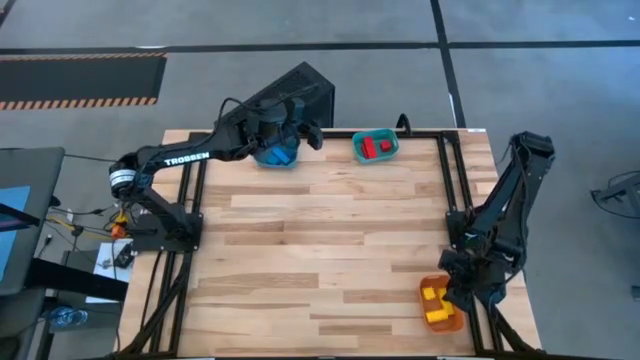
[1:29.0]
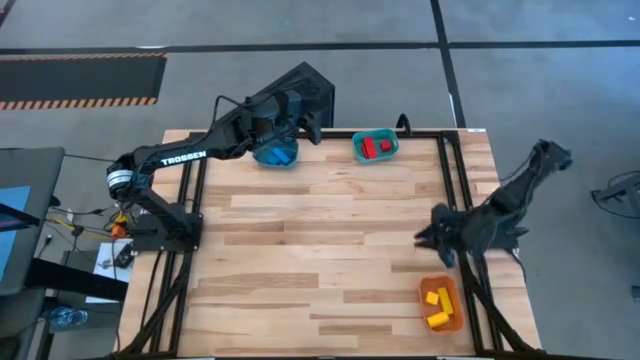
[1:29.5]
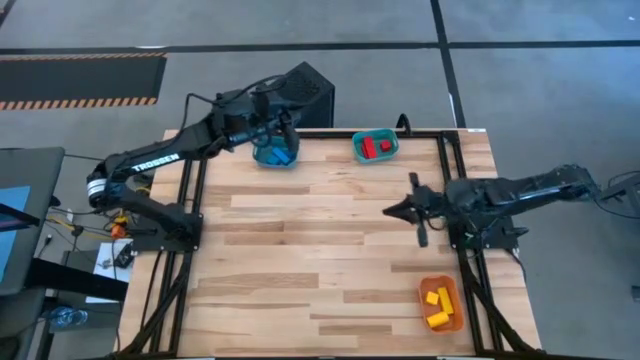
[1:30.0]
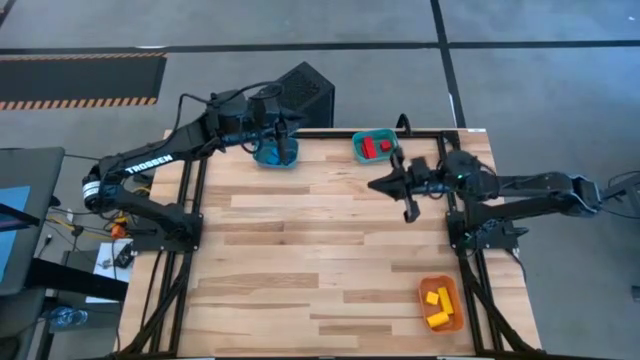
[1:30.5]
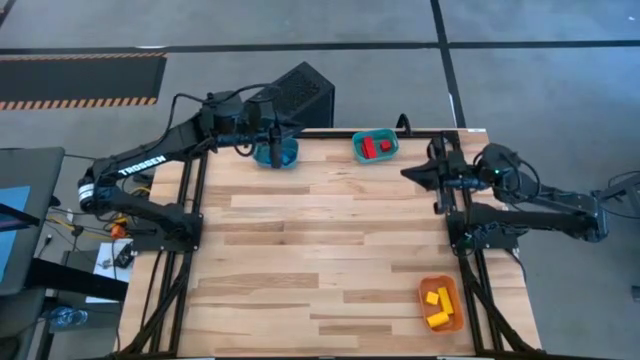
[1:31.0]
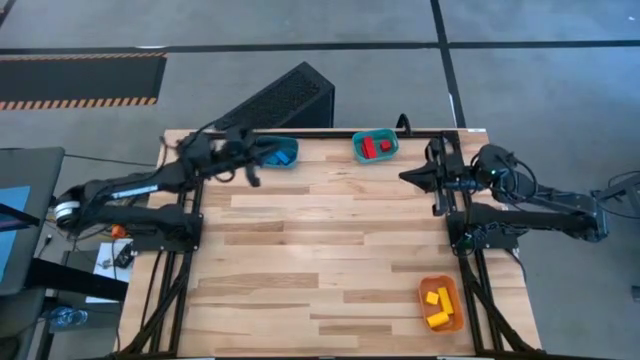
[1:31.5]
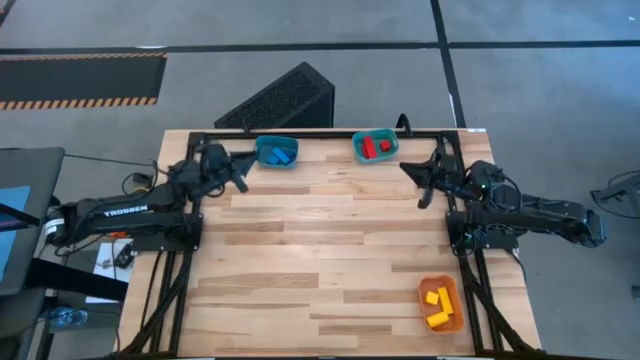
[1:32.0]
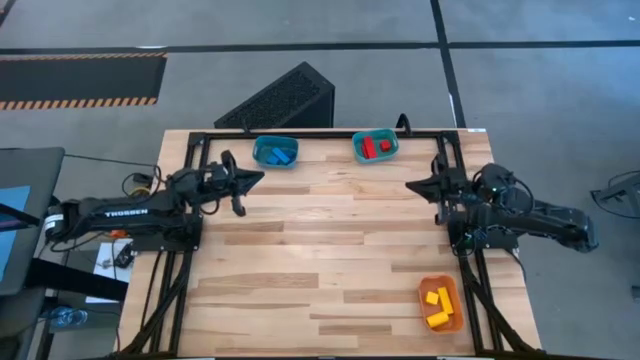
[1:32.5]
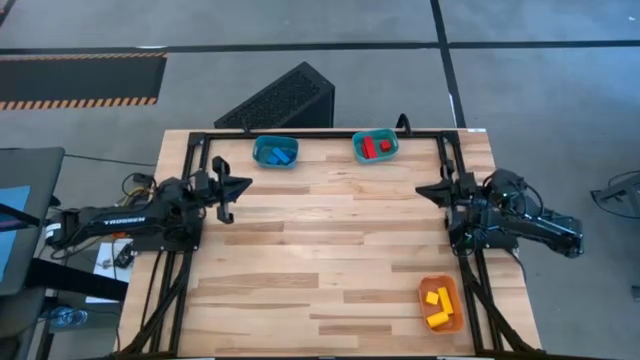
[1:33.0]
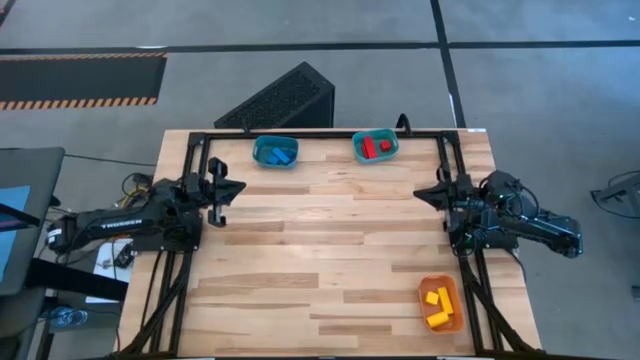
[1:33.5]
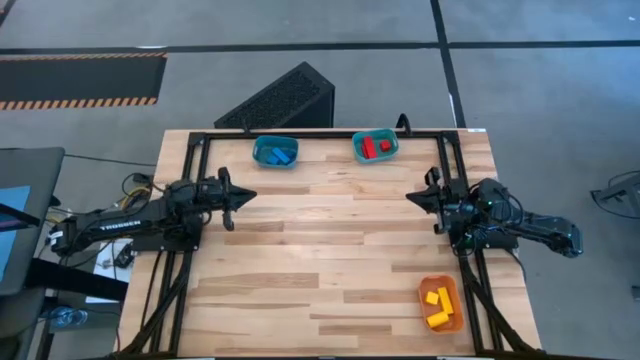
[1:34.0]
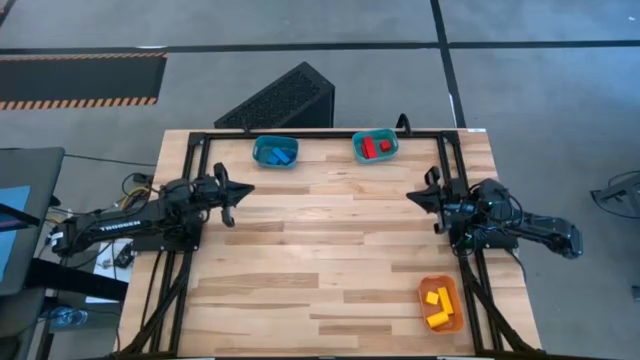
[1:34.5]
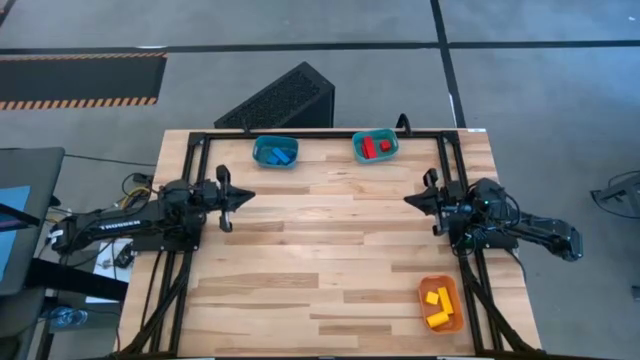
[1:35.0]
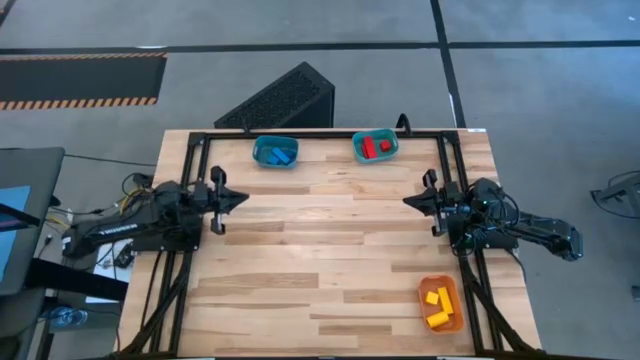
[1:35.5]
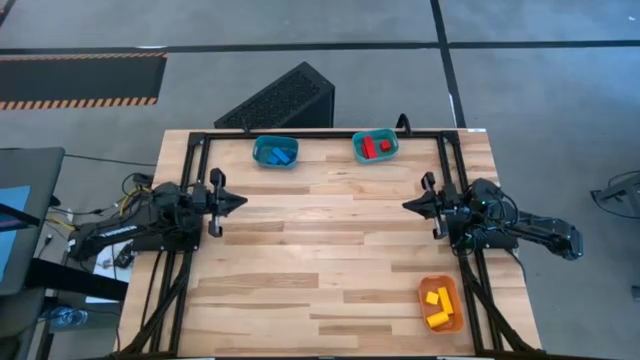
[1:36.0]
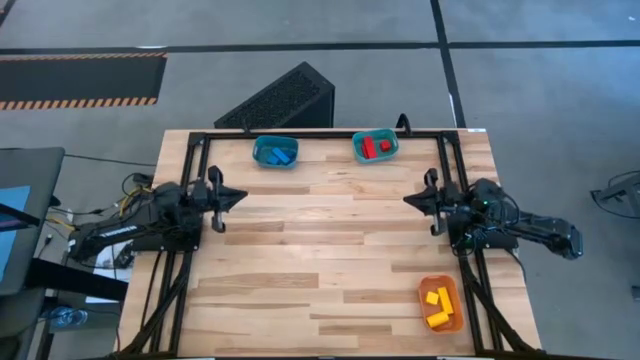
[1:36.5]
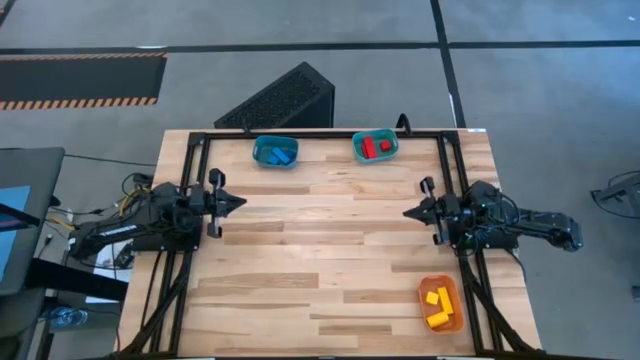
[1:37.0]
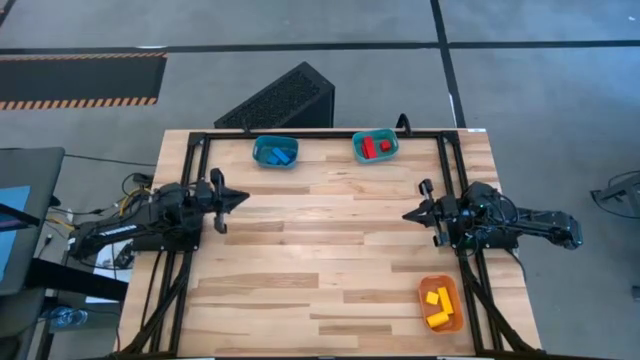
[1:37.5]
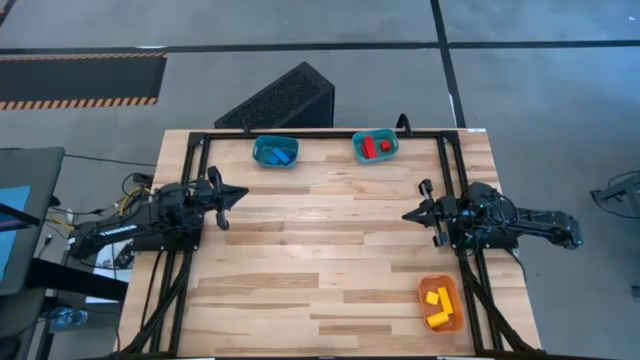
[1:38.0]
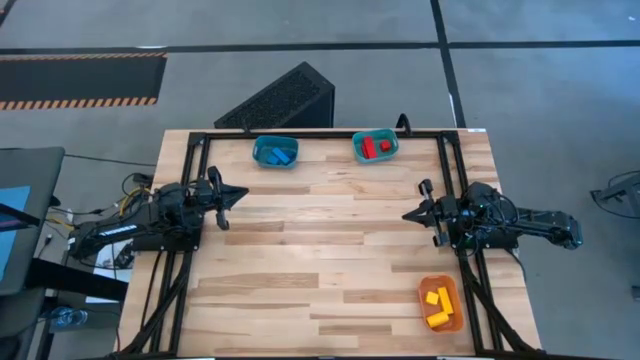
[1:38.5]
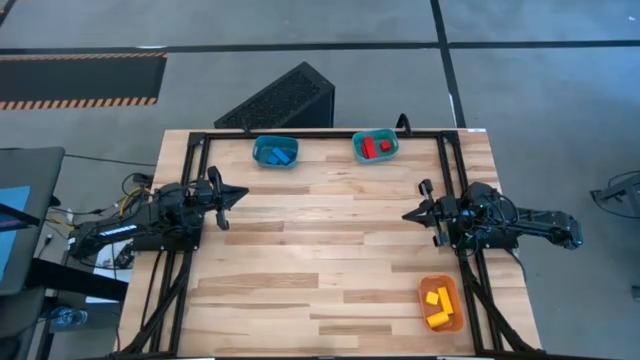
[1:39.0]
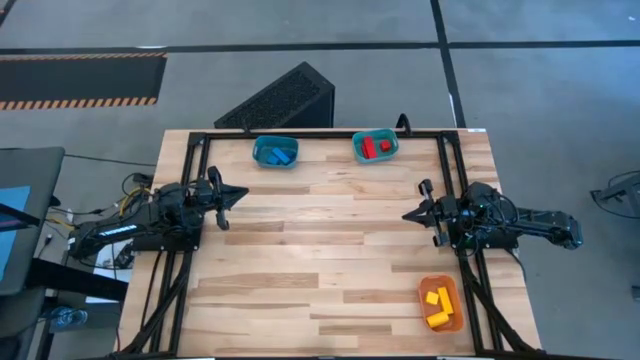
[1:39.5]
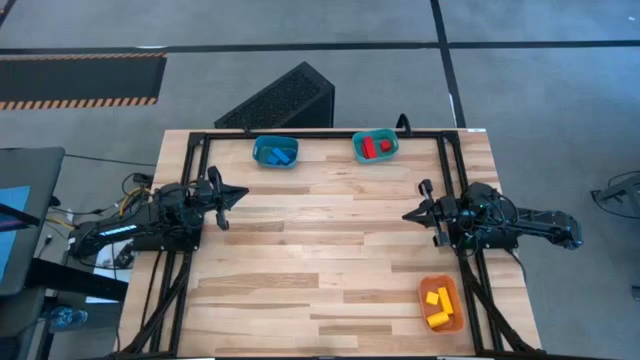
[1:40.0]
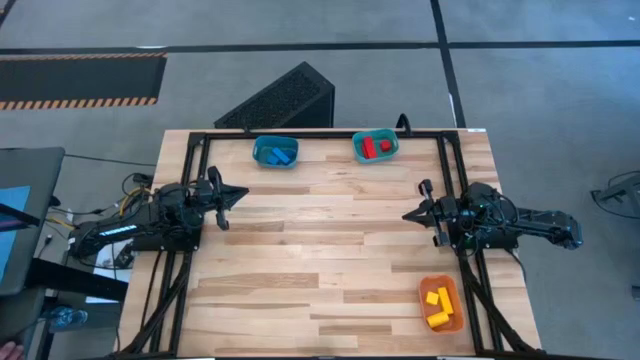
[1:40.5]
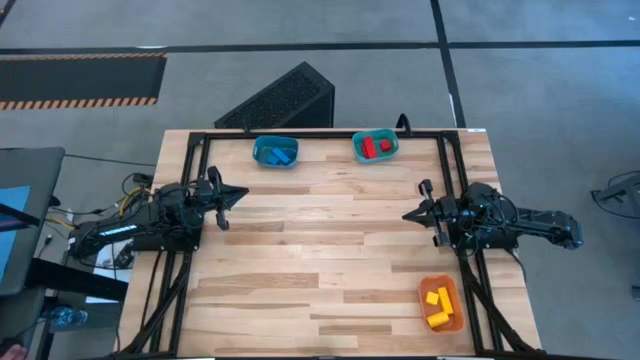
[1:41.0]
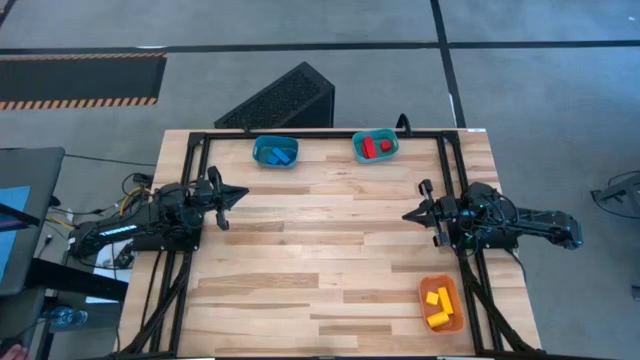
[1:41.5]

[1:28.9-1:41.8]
Task: Sort & place blocks by color
Return to Home Position

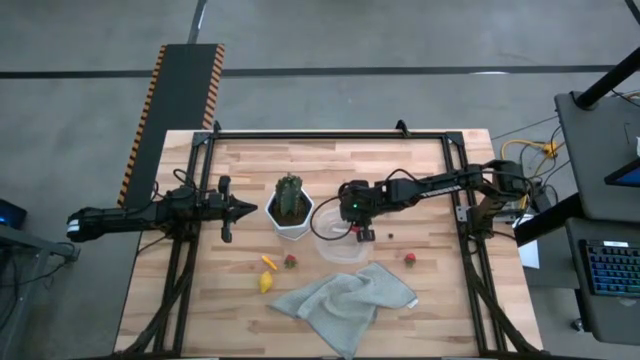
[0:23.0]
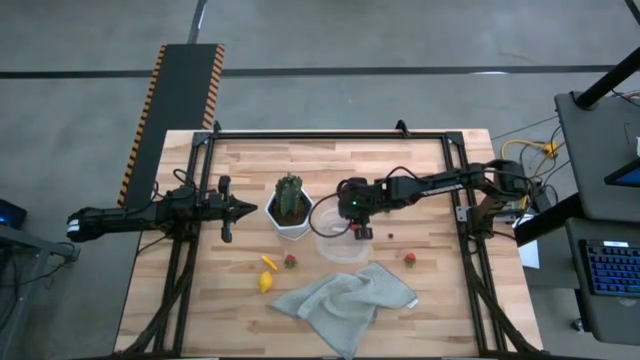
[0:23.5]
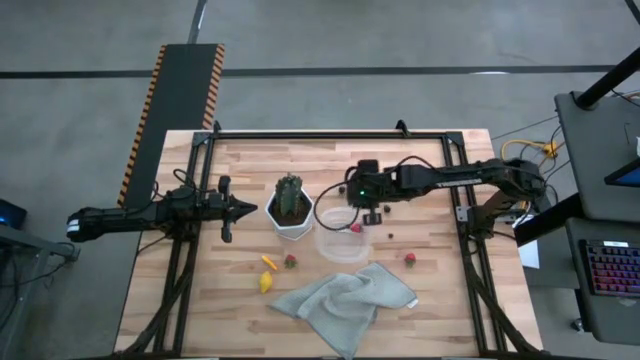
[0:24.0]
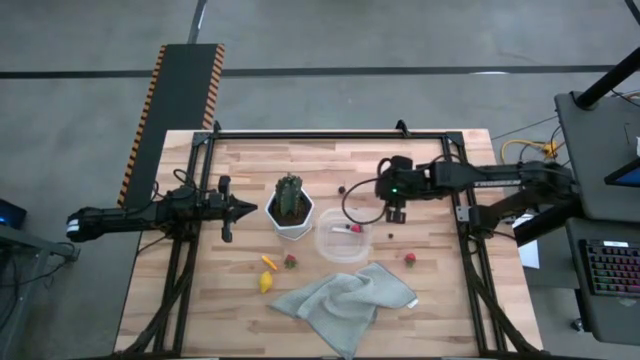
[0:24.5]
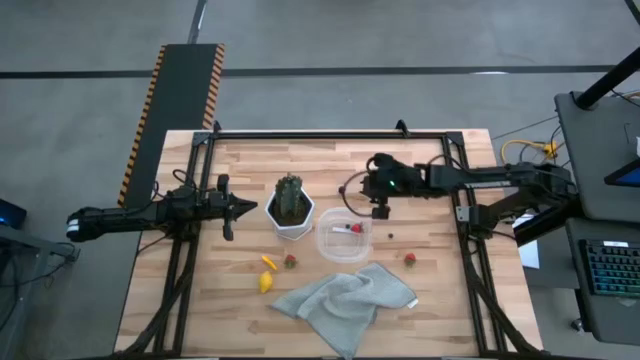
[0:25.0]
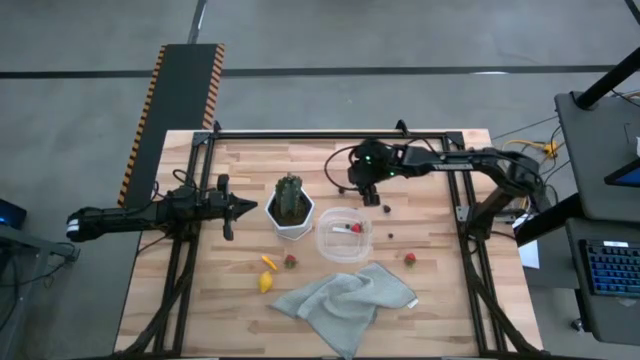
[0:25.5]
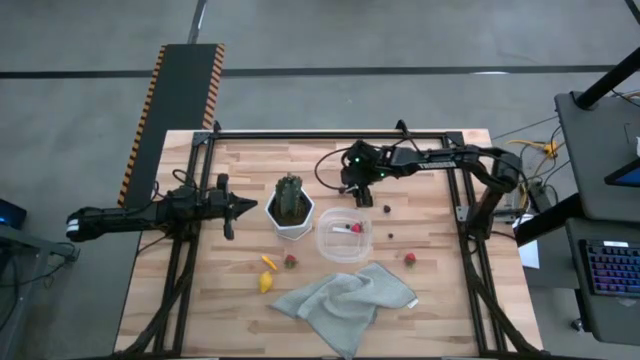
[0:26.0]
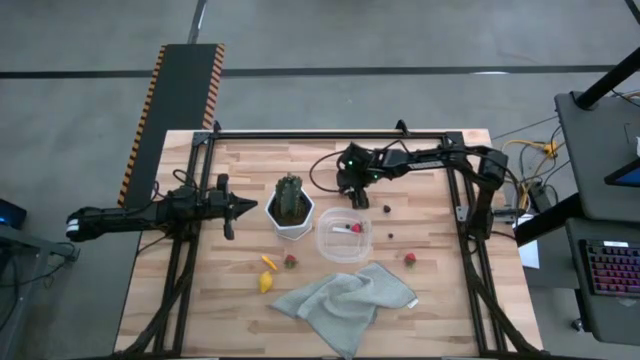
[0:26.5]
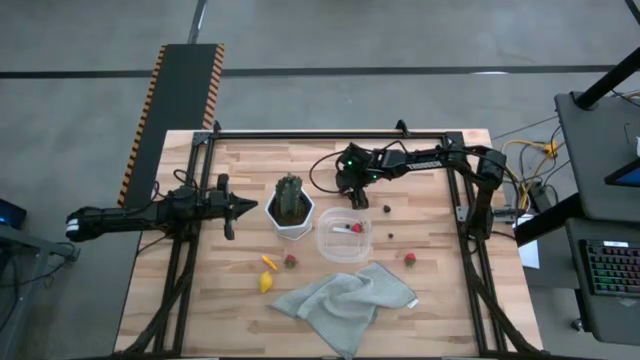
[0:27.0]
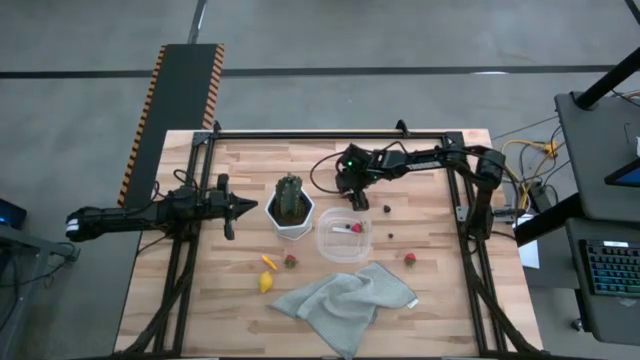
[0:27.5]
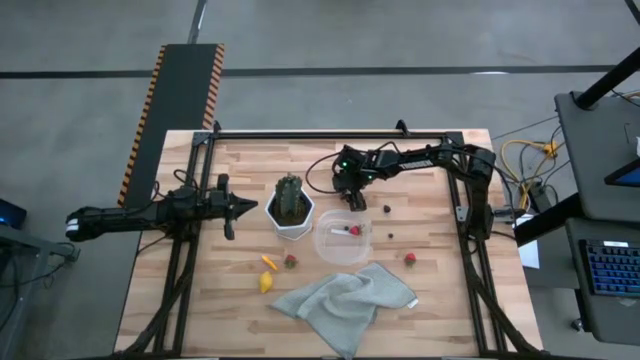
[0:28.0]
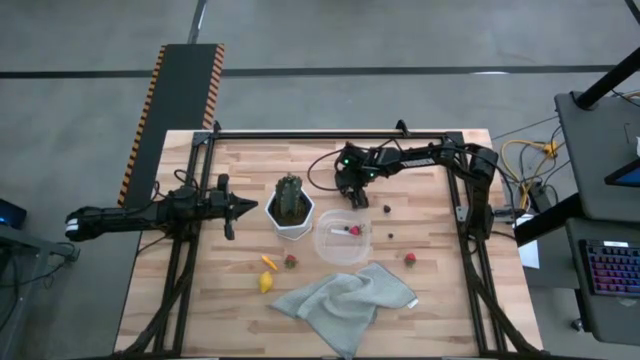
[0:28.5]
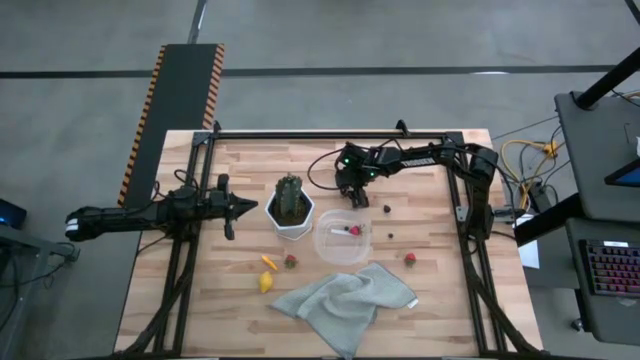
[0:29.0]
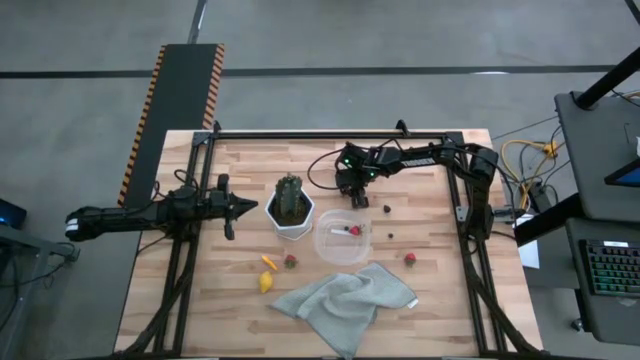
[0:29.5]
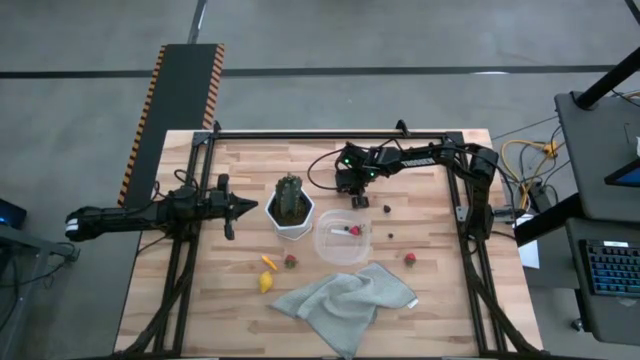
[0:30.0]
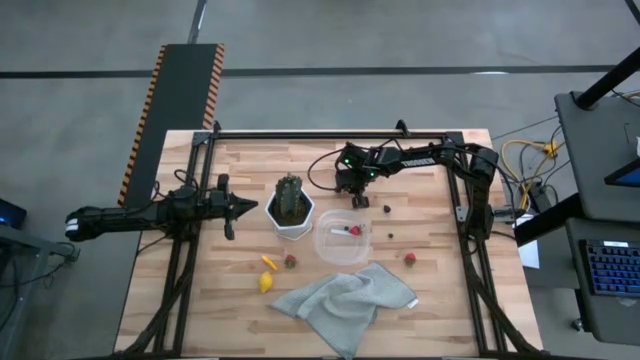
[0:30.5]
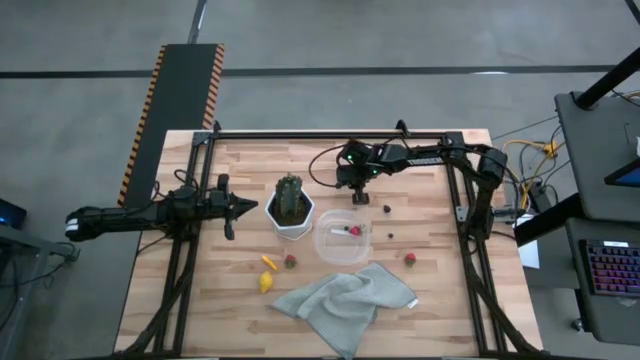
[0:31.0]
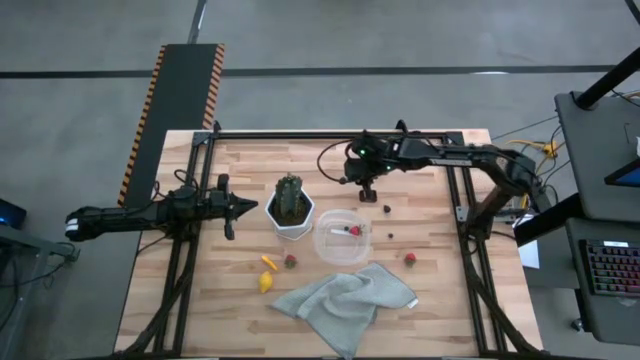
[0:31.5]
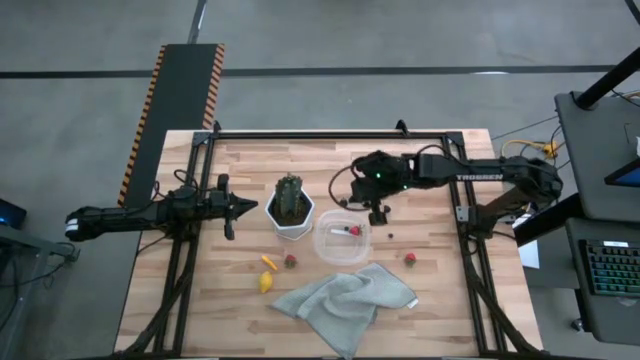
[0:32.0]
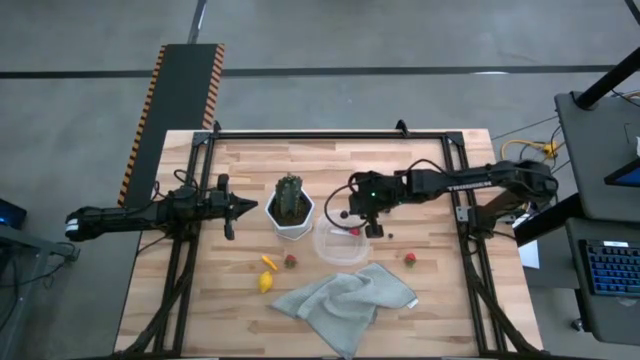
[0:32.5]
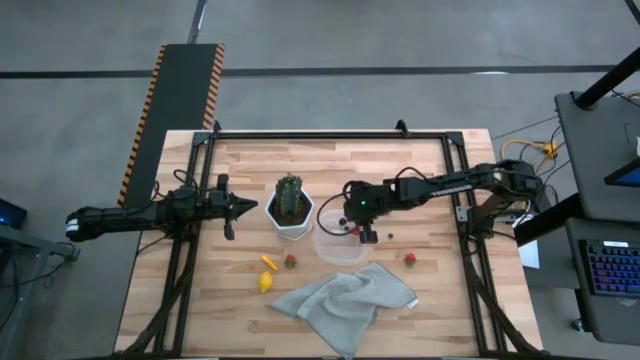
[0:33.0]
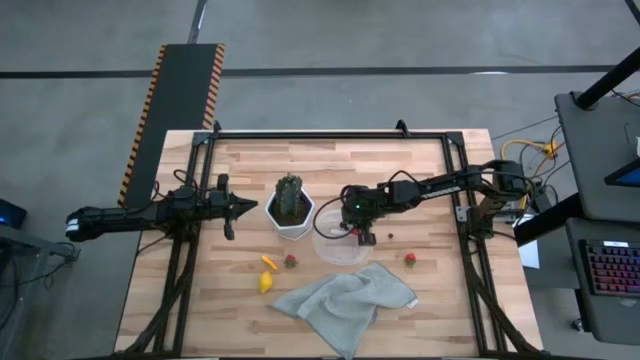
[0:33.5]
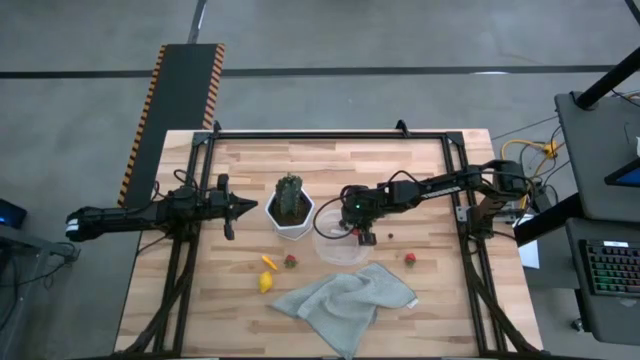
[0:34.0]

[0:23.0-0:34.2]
Task: Pick and placing Produce into tupperware
Put the cherry into the transparent bin
